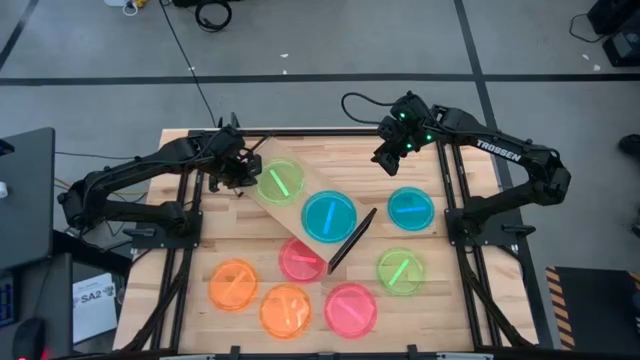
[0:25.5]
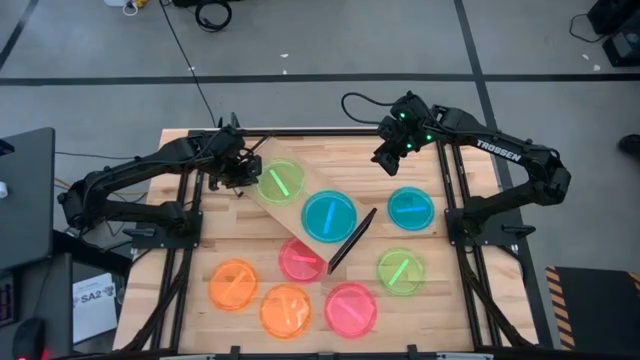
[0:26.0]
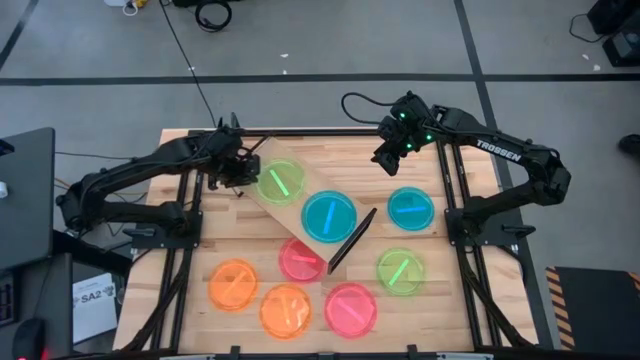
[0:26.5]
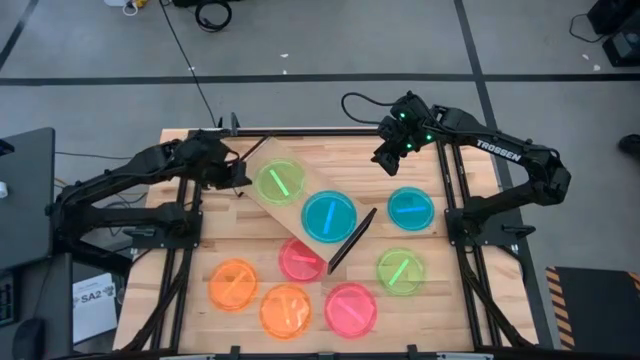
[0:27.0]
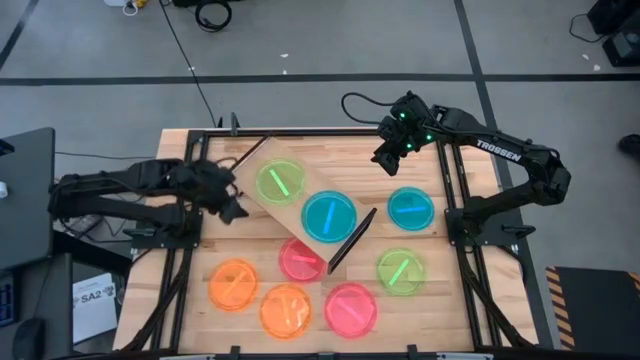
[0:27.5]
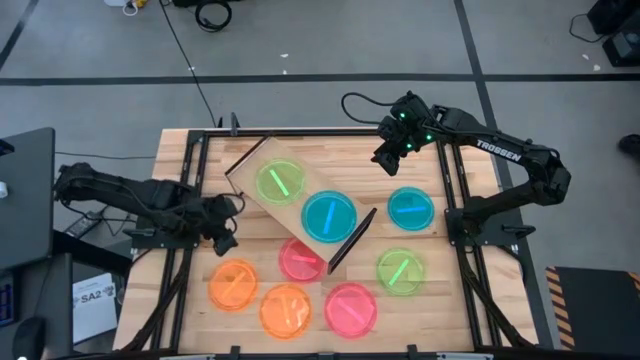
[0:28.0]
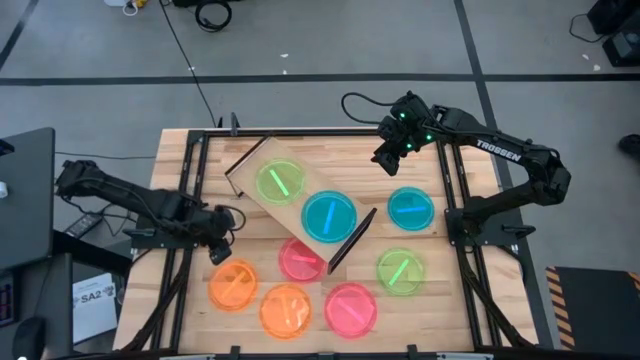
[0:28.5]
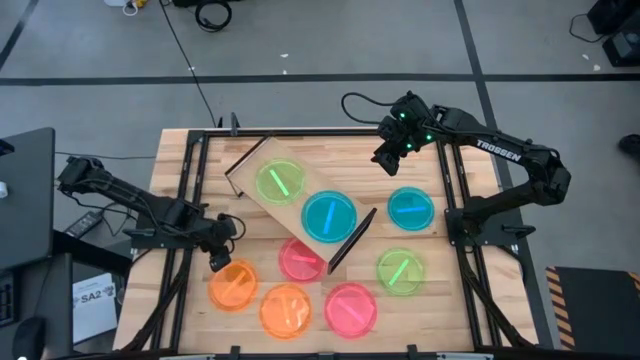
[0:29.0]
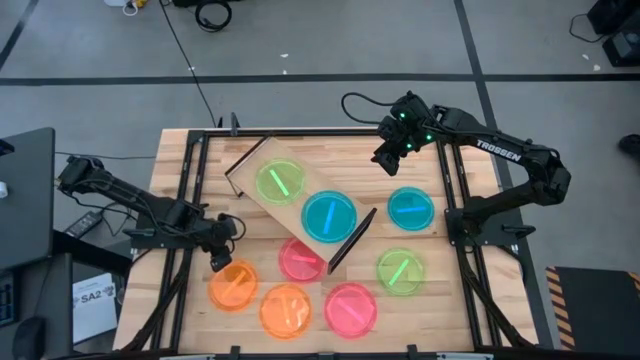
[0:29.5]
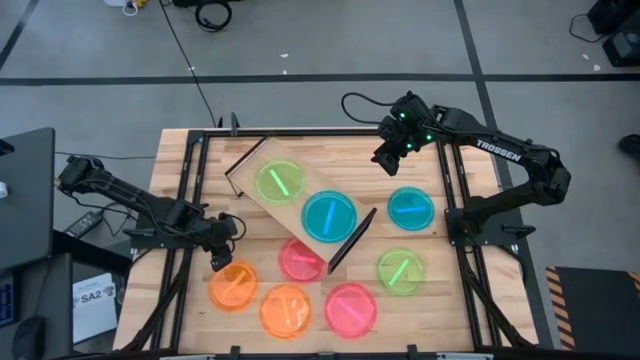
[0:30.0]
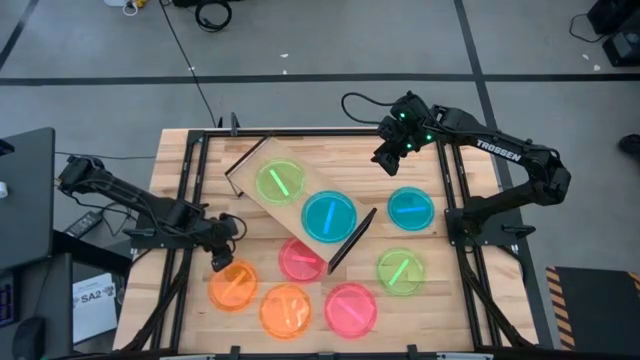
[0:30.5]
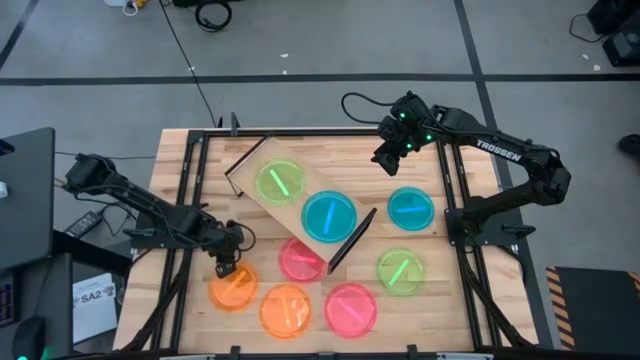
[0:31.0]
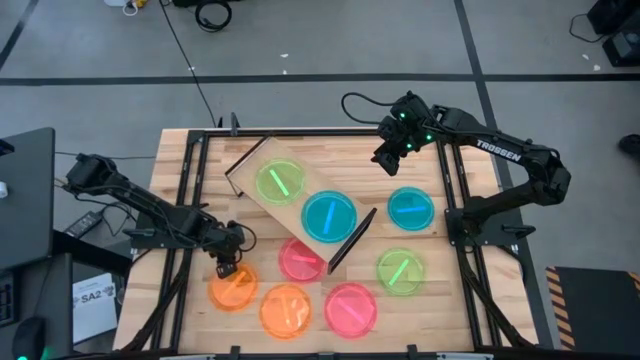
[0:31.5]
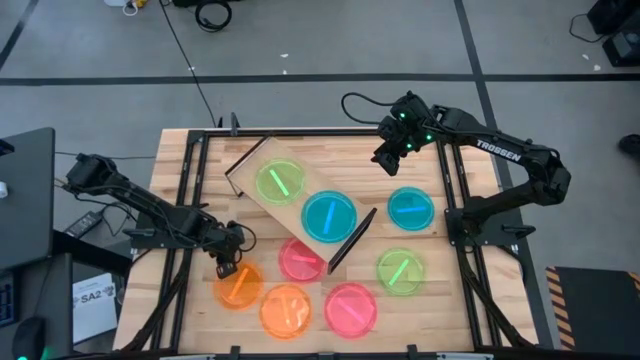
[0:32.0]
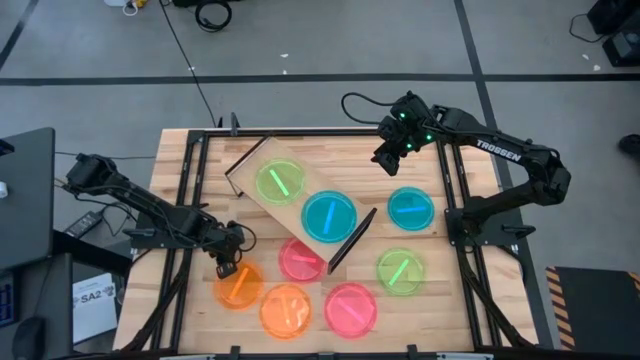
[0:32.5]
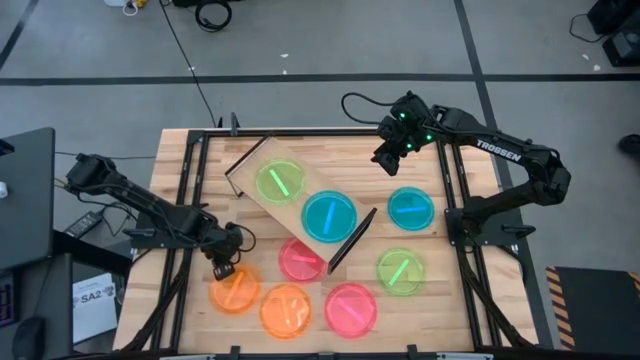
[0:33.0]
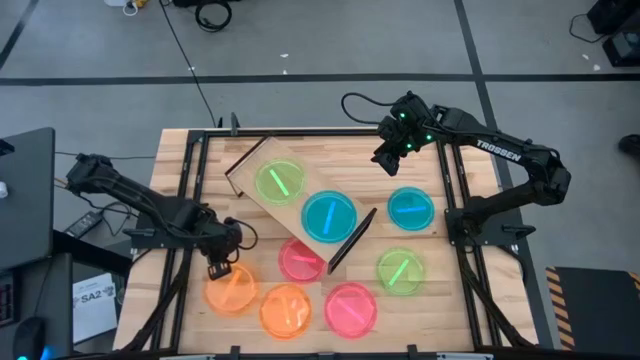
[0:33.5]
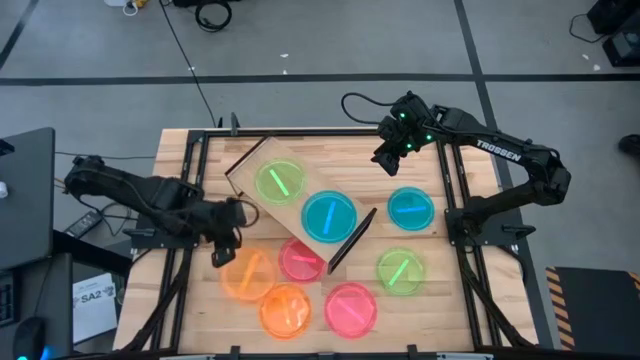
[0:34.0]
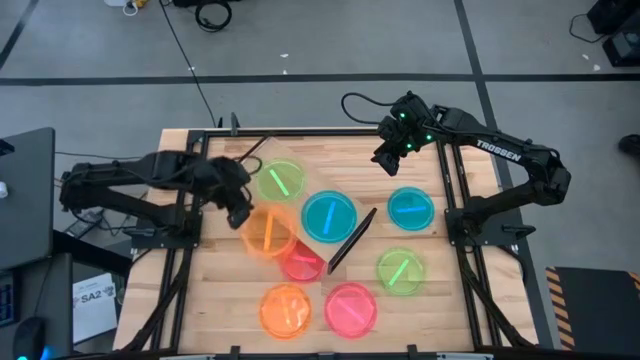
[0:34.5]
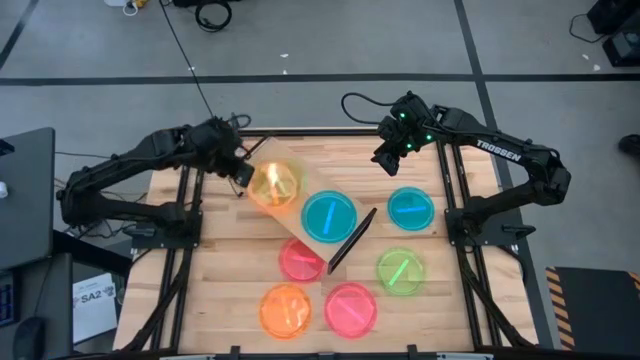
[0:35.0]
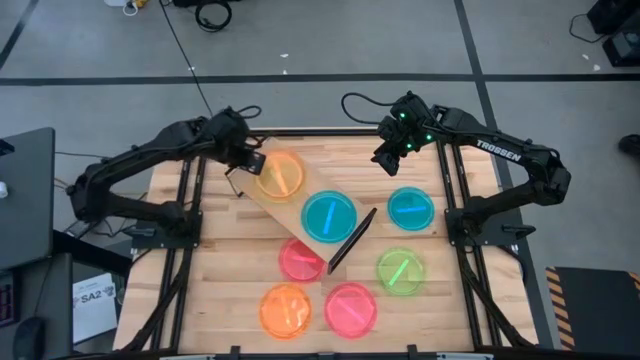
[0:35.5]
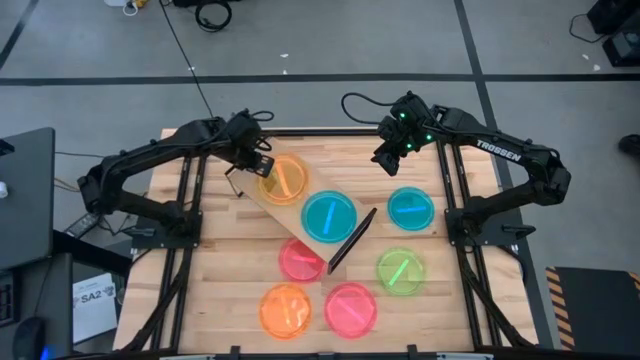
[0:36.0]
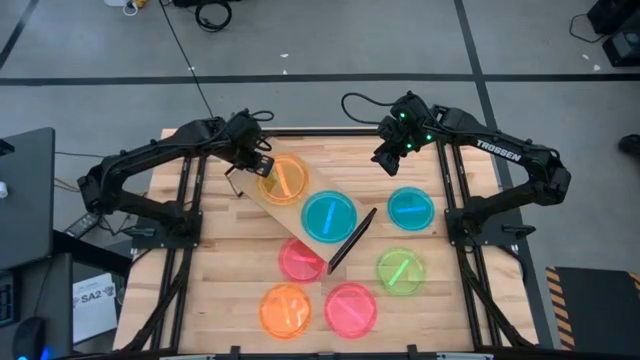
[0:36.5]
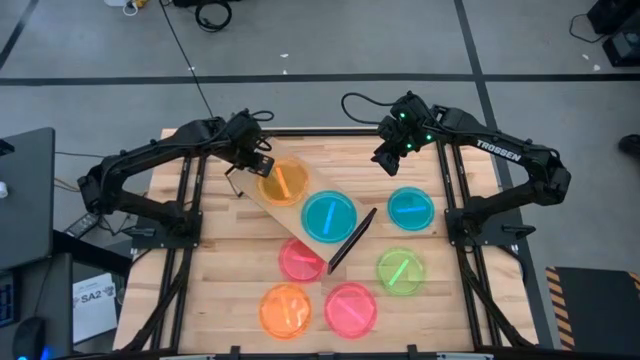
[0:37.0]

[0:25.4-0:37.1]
Task: Place and stack plates onto a shelf
Stack the top orange plate on top of the green plate on the shelf

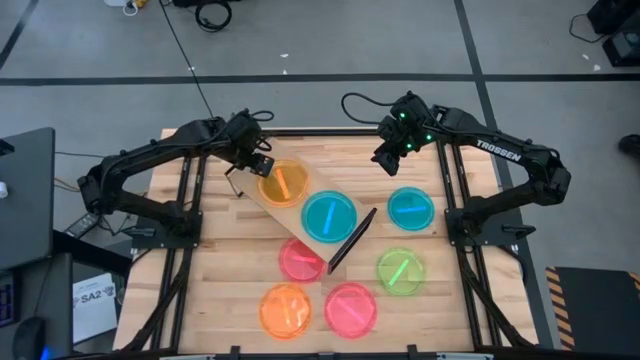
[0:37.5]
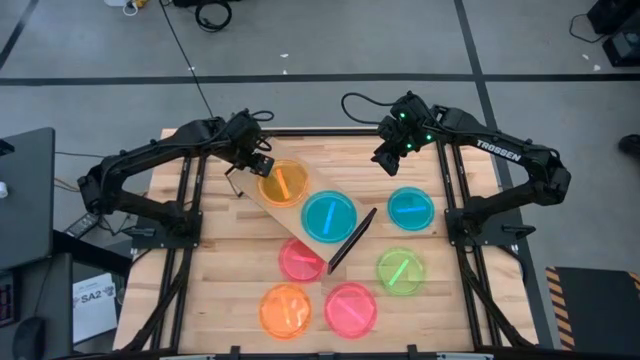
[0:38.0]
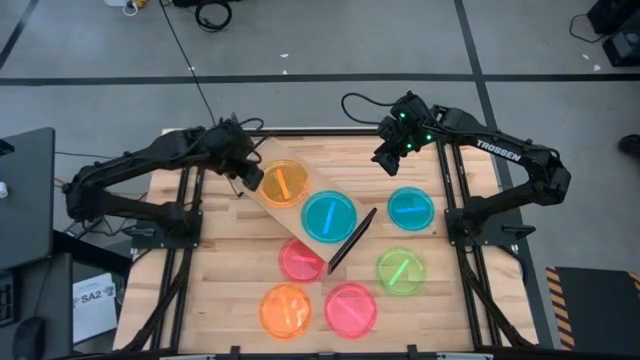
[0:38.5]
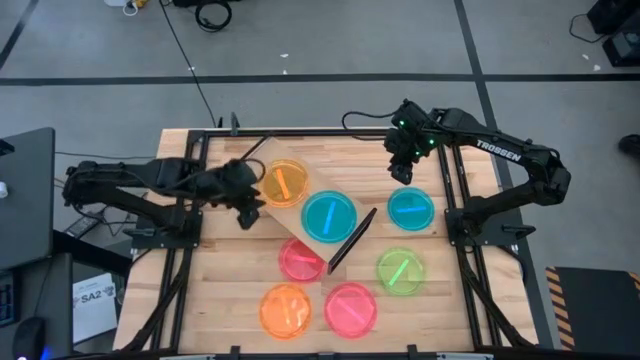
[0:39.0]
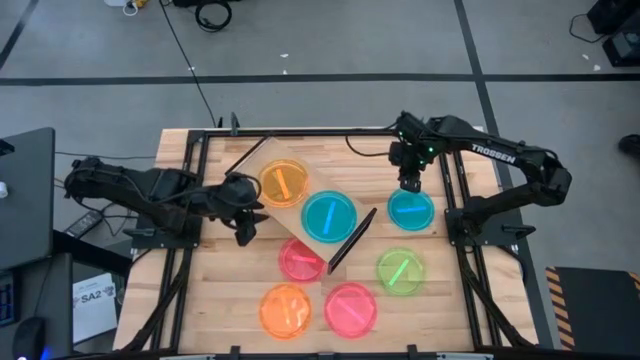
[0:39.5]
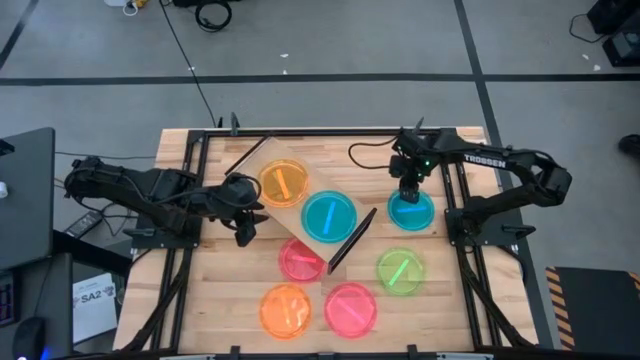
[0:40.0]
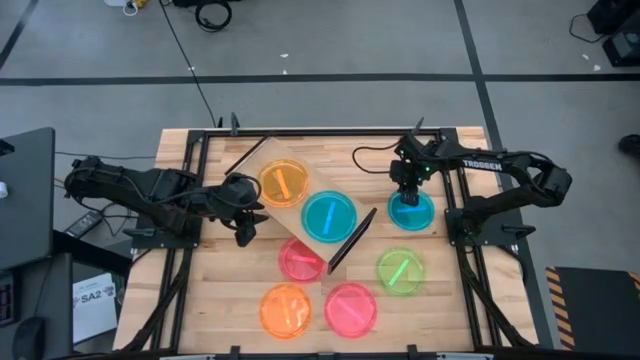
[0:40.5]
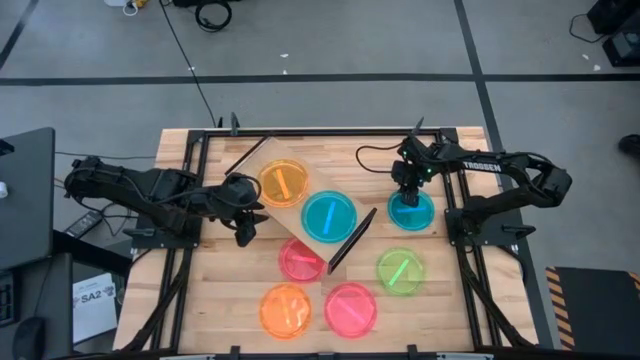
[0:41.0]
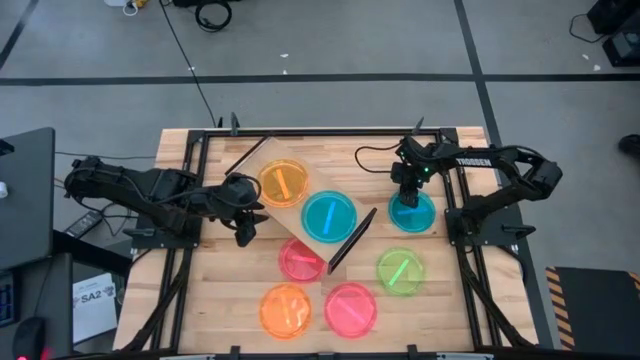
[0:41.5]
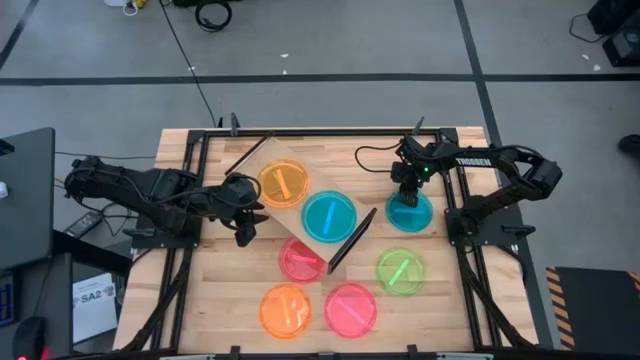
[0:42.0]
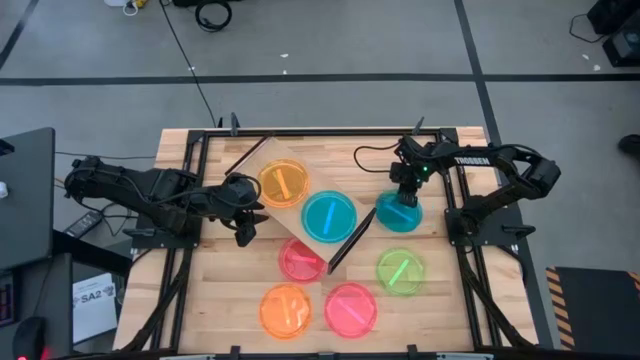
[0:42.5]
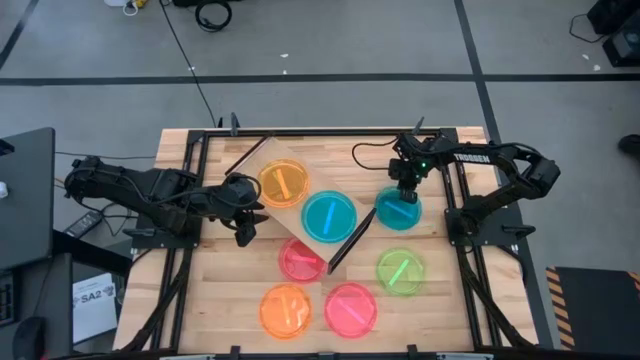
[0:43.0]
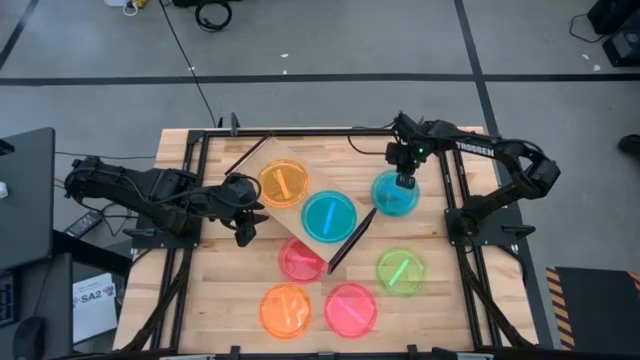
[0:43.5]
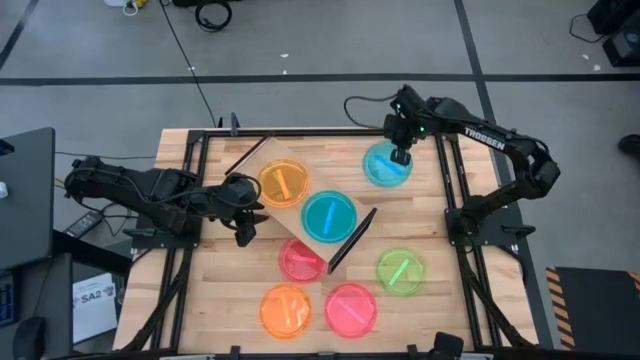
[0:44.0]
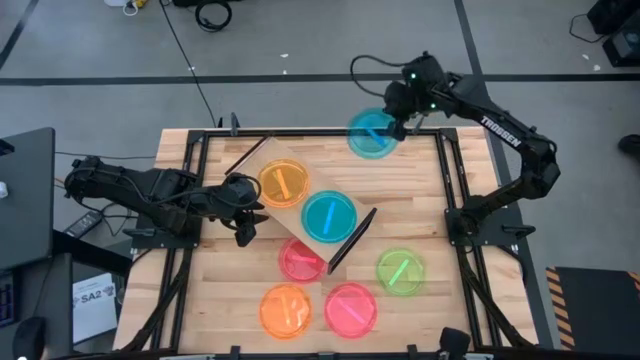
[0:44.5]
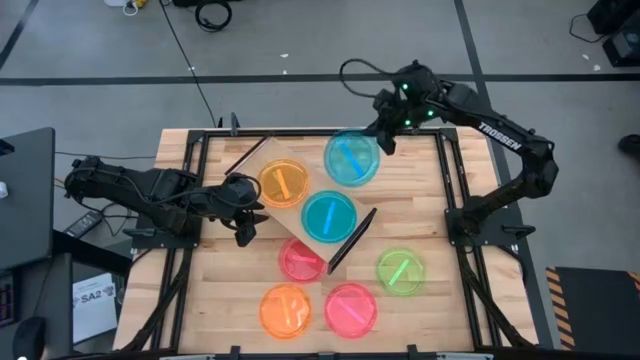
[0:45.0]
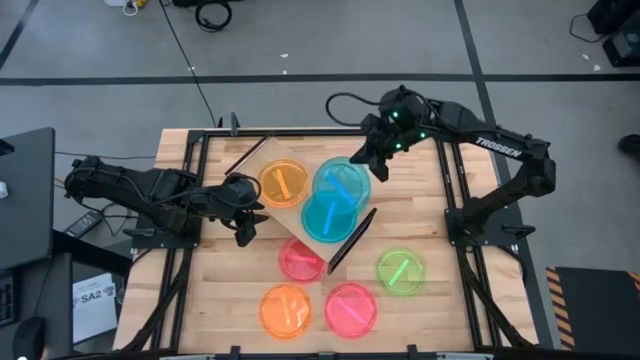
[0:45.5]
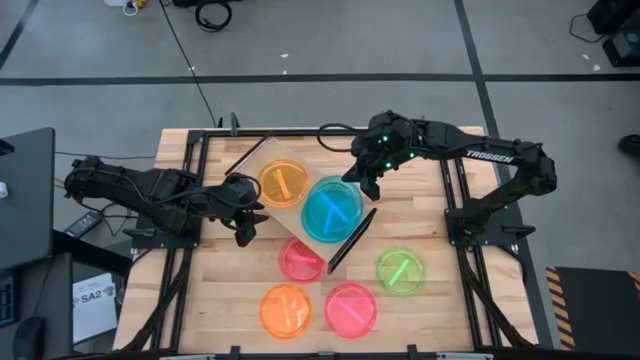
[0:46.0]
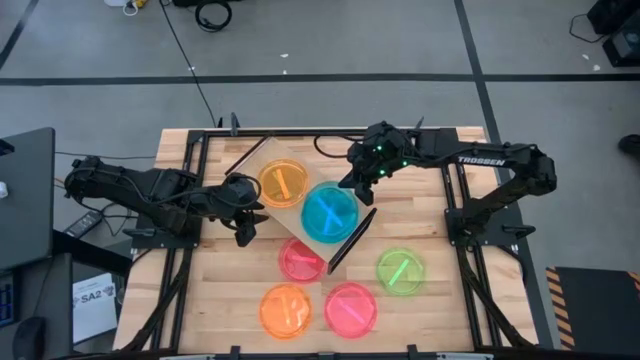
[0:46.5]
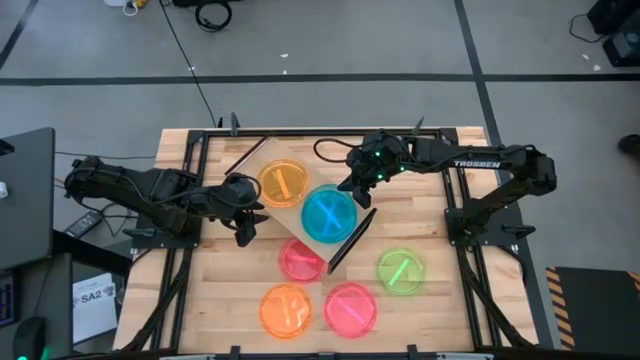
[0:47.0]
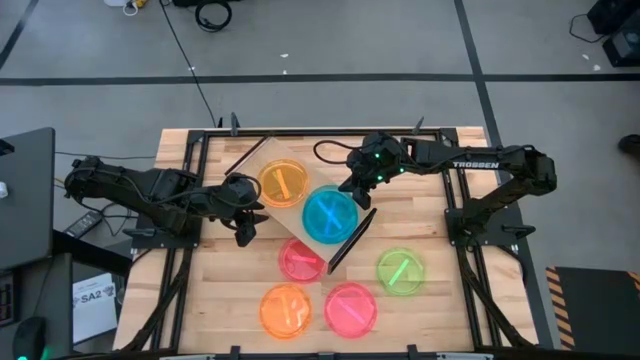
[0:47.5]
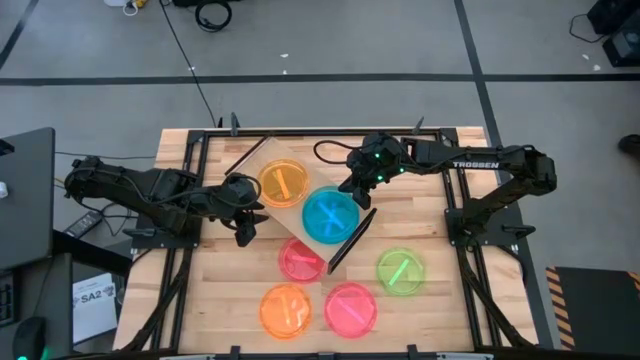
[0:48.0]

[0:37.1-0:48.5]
Stack the blue plate on top of the blue plate on the shelf
